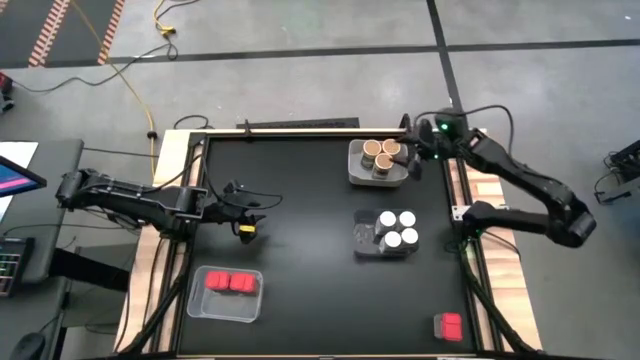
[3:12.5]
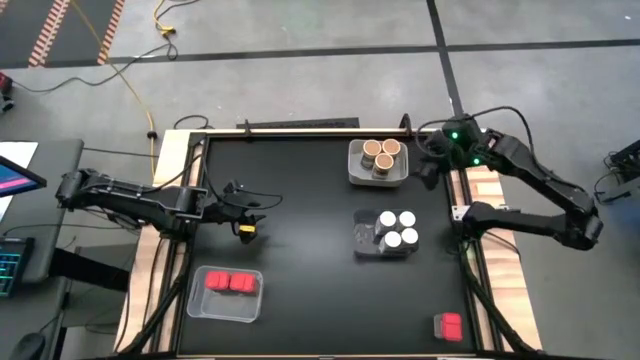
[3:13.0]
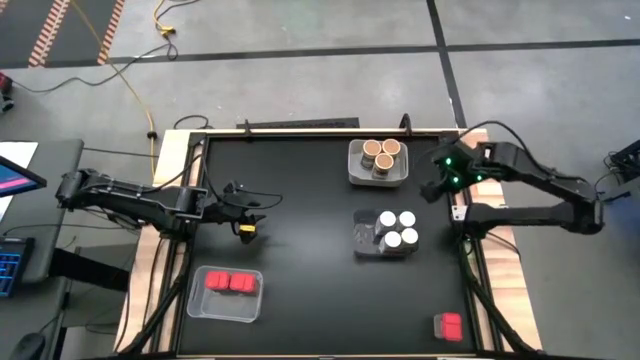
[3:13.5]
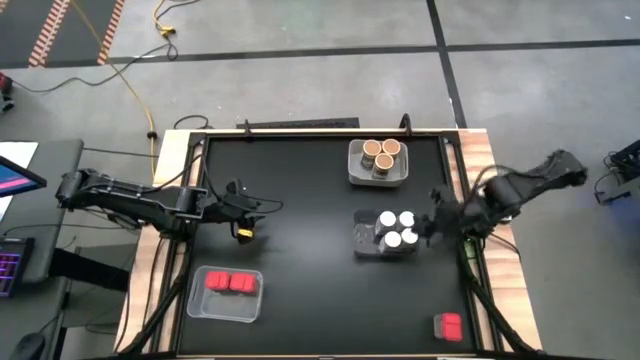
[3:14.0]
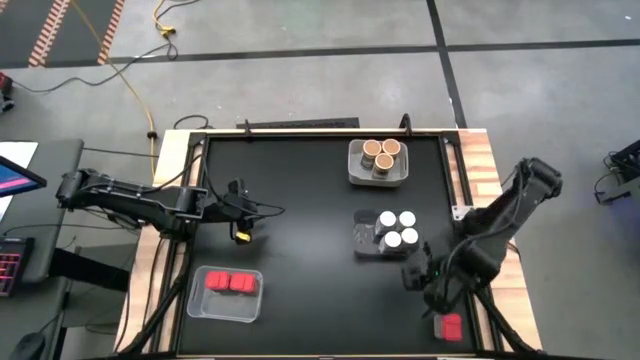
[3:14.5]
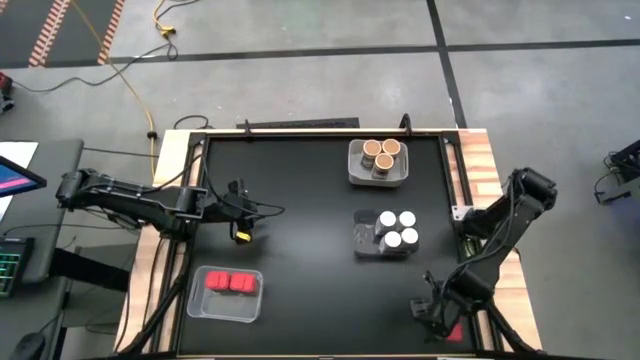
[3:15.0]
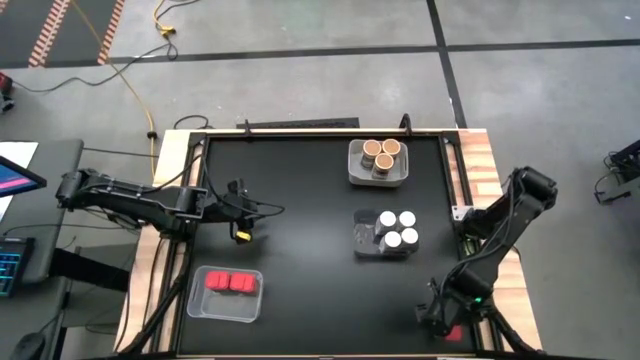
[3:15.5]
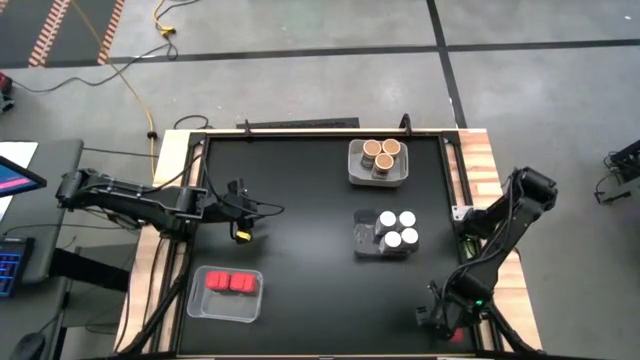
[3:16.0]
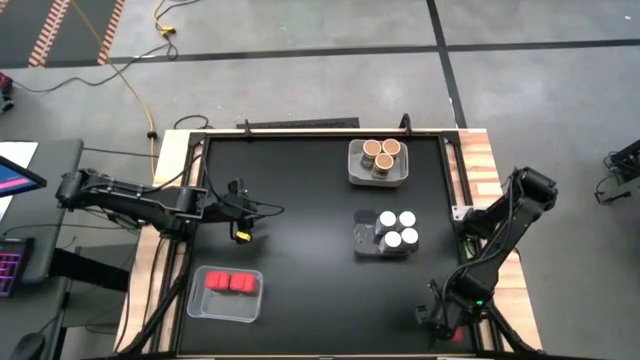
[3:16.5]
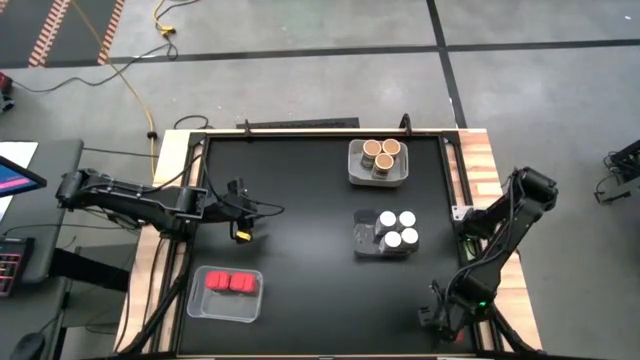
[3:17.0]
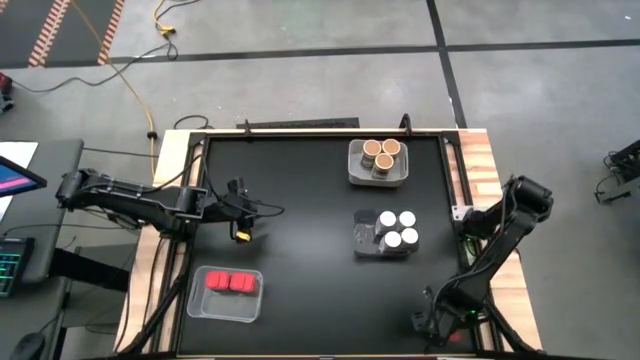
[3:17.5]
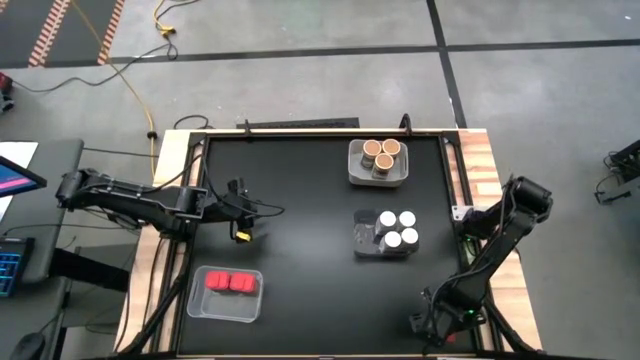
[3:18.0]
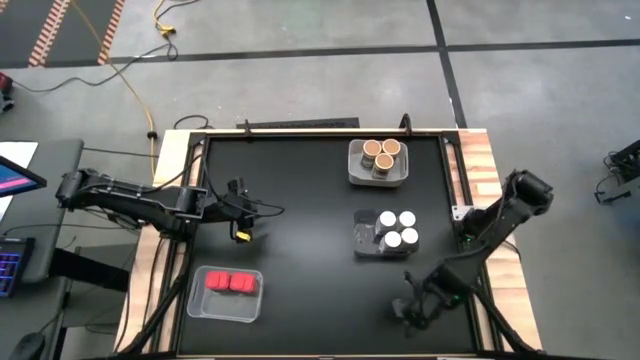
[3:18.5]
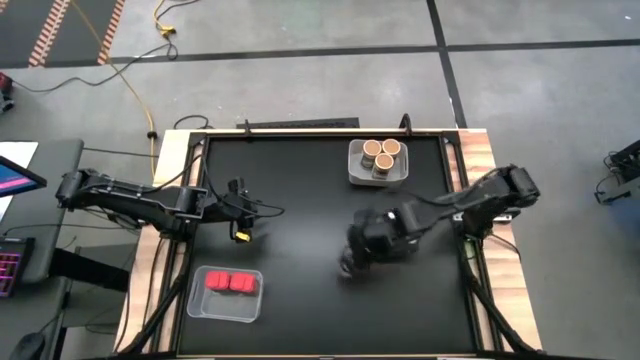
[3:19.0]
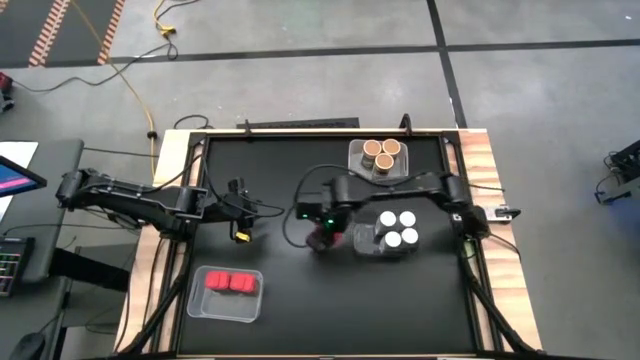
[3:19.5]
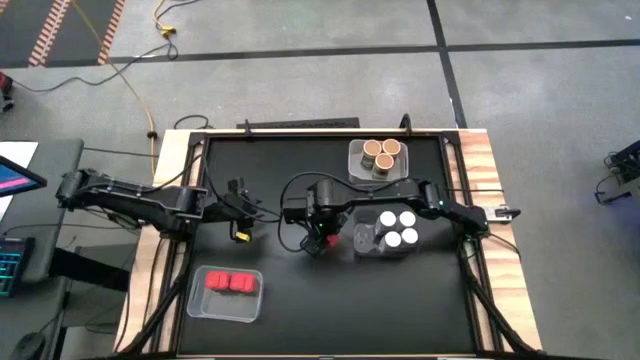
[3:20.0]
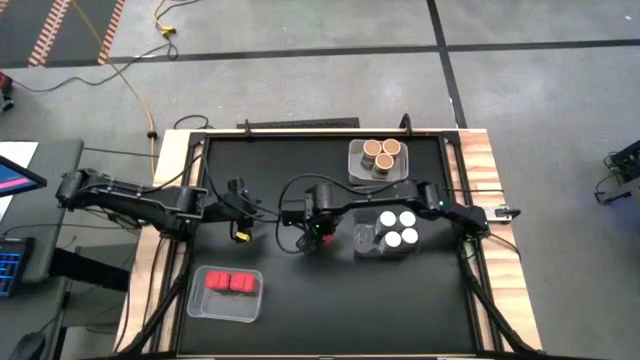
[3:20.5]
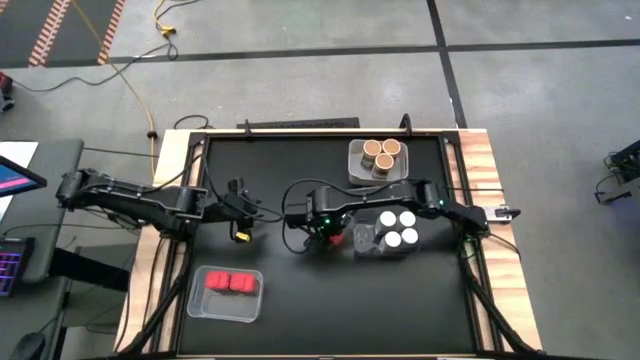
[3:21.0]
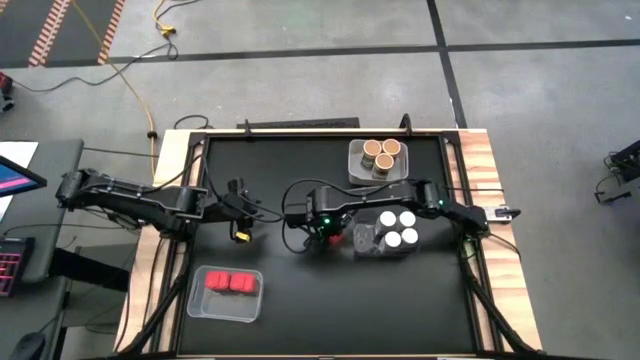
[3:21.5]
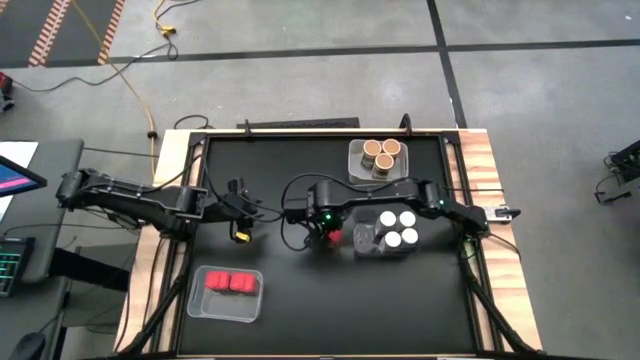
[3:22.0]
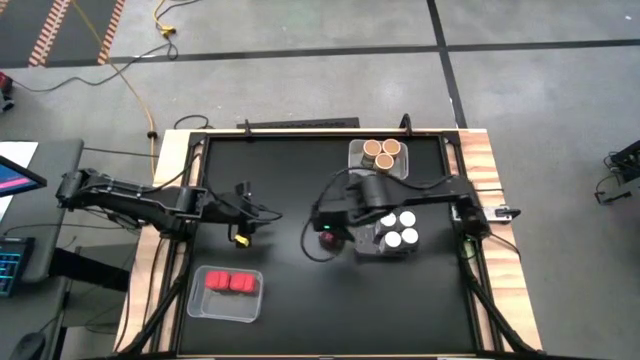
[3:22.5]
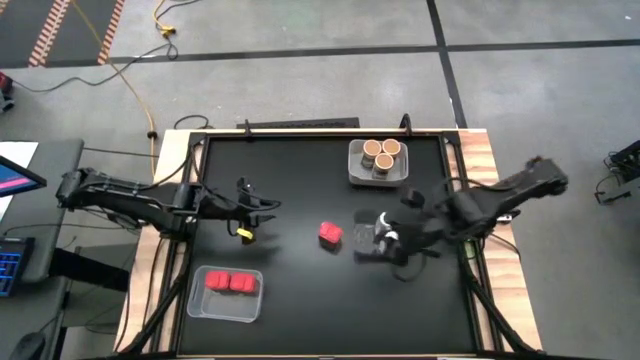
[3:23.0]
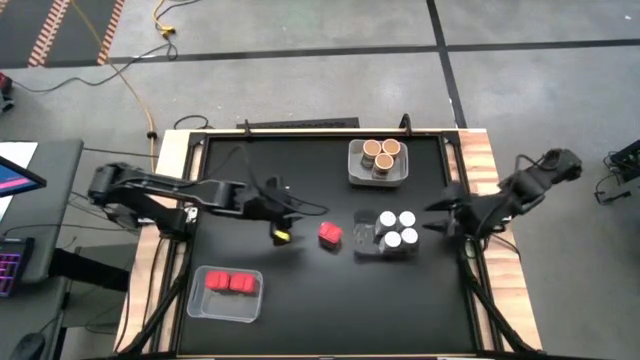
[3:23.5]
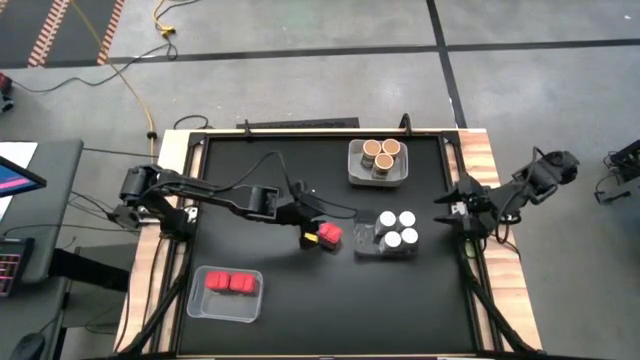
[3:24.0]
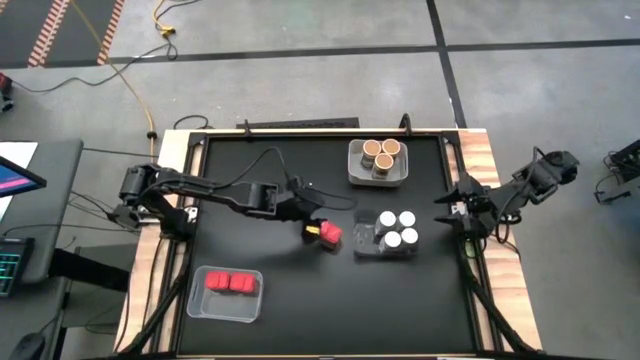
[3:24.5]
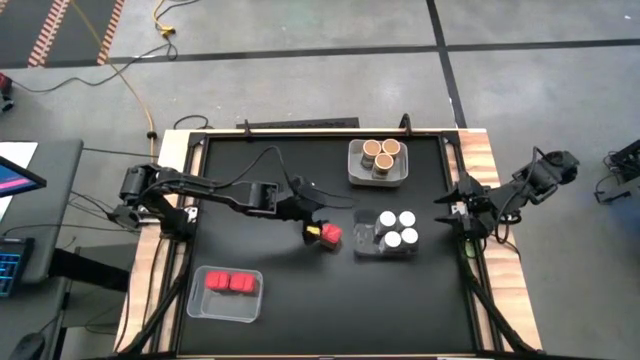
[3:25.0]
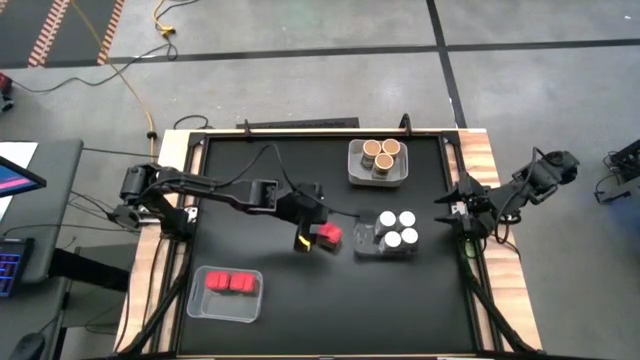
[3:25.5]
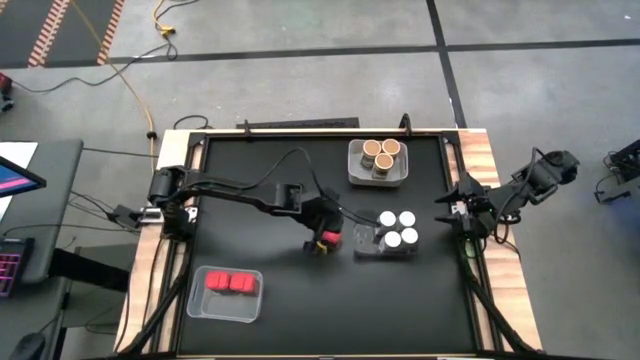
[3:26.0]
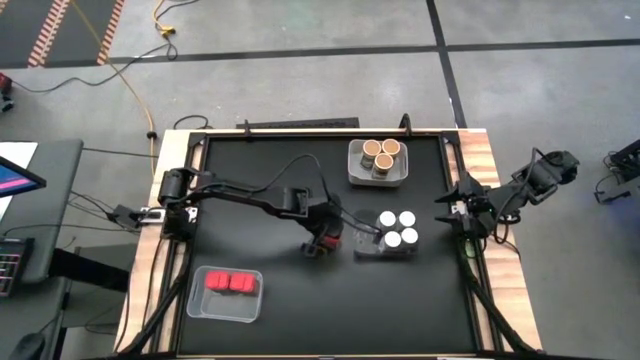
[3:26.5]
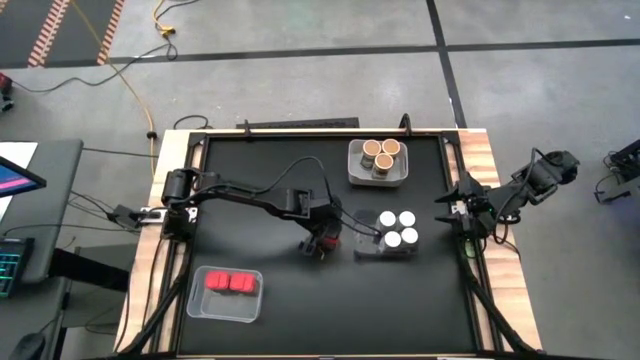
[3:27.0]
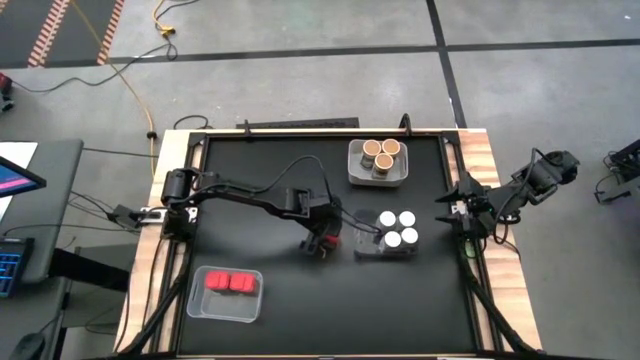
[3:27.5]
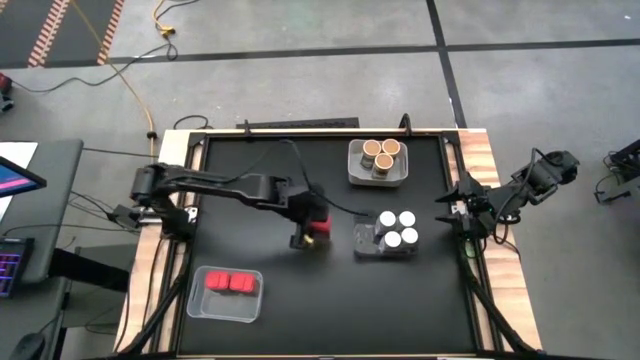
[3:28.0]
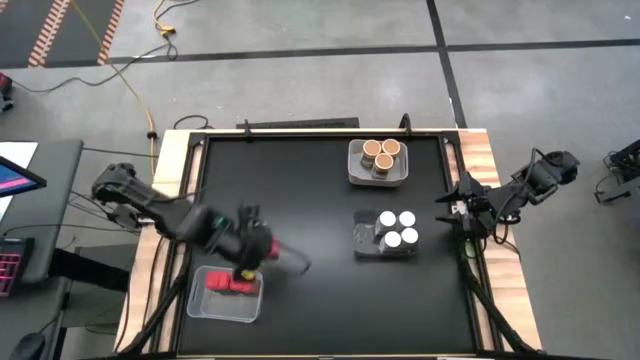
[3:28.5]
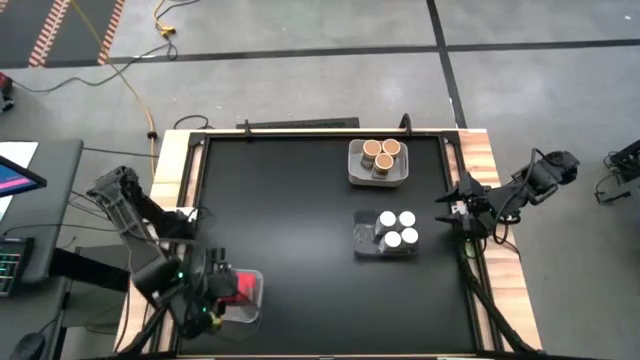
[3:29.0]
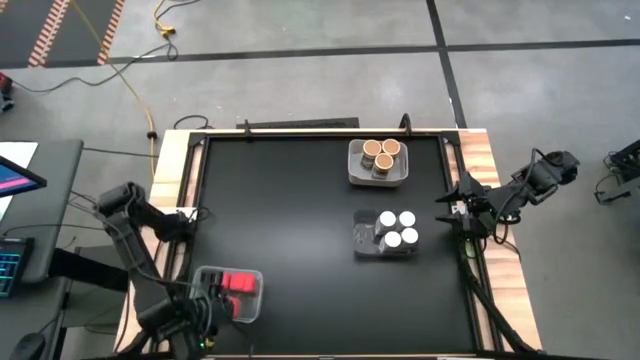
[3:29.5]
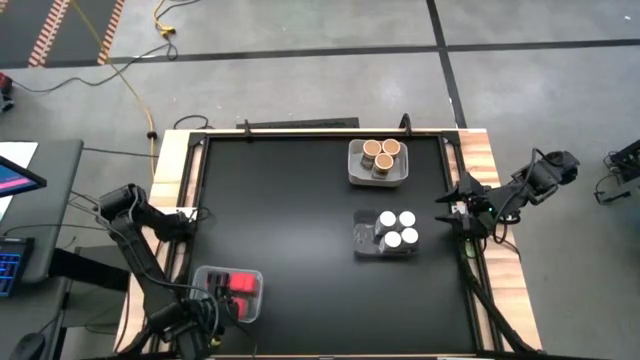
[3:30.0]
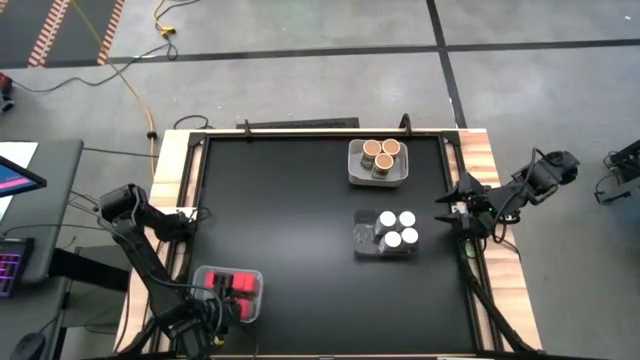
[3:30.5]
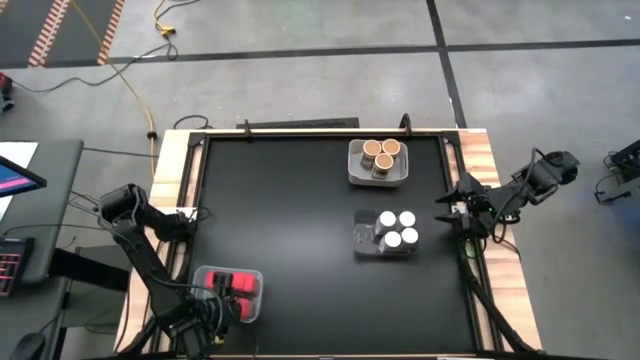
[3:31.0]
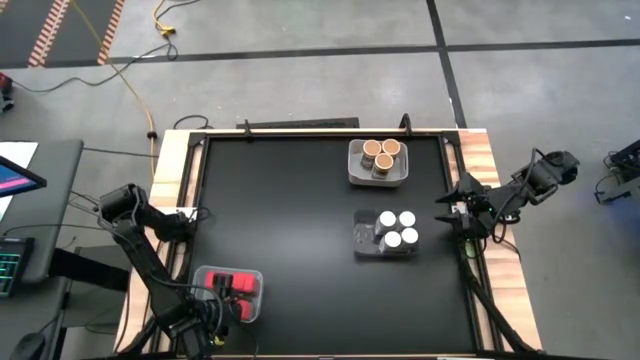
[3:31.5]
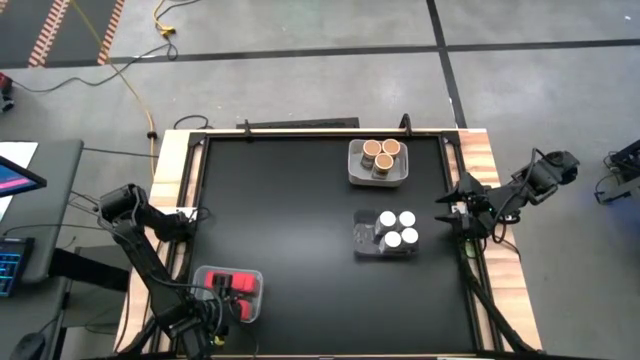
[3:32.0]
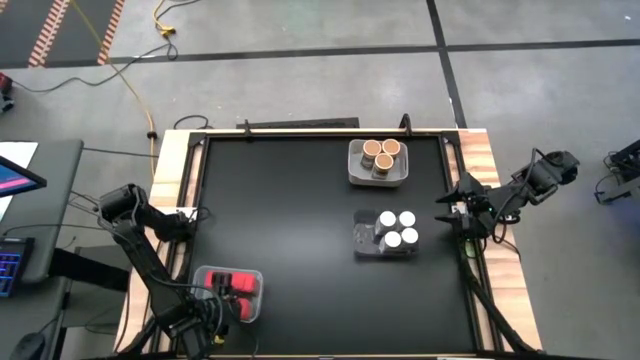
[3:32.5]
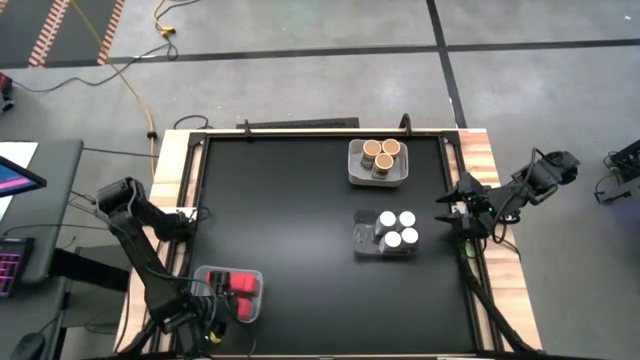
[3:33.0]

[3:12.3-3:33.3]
Task: Sort spices by type
Put the red spice can in the transparent bin

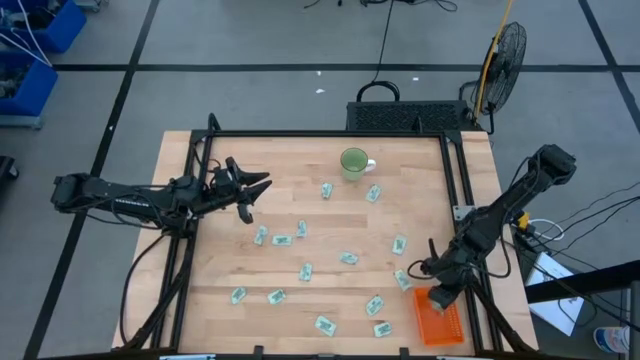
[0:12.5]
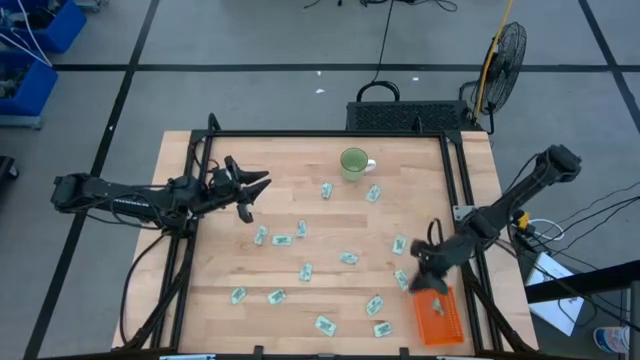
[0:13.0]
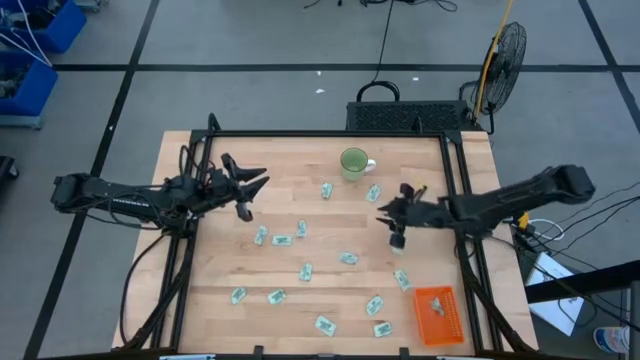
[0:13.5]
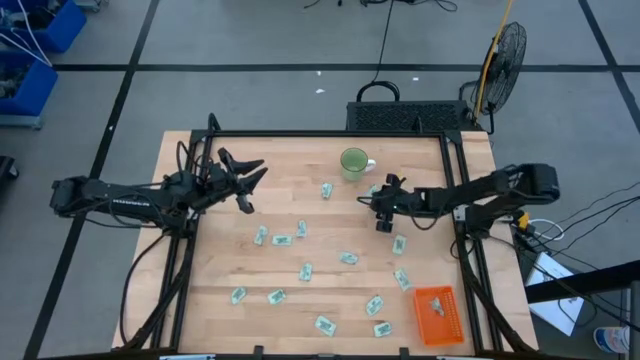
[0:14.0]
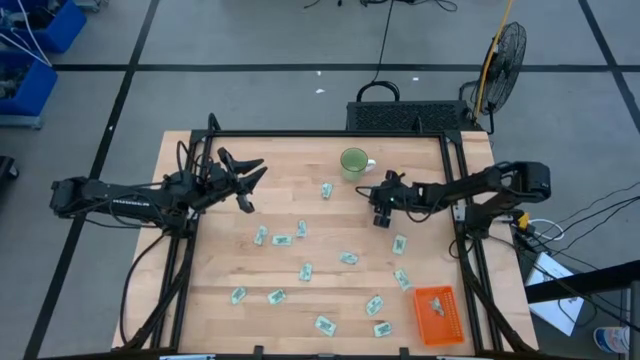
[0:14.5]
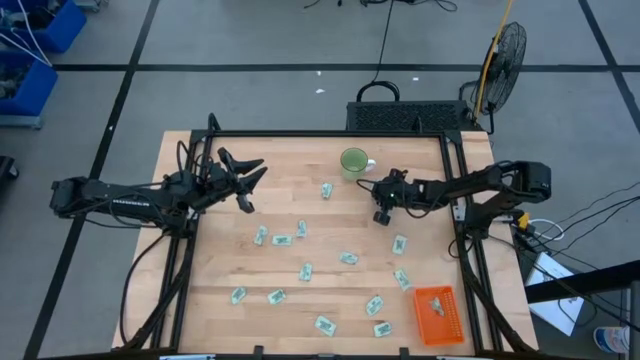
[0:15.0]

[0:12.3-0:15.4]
Task: Pick and place Stevia / Truvia into bins
Put the stevia packet into the orange bin
